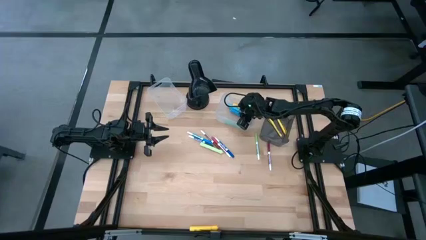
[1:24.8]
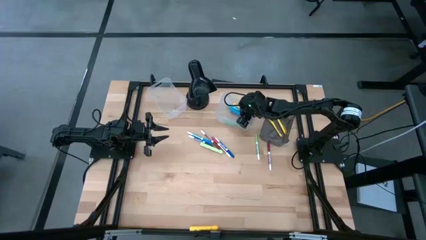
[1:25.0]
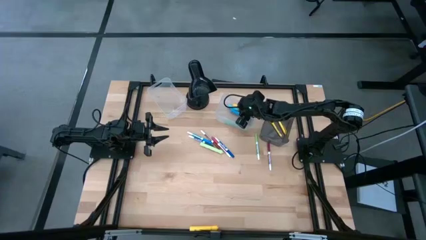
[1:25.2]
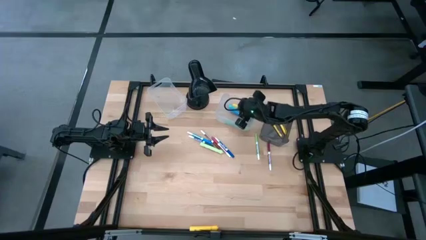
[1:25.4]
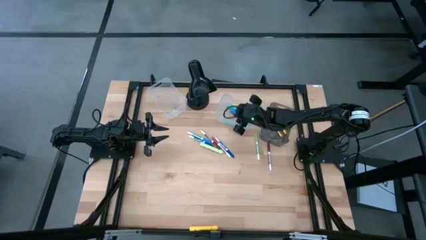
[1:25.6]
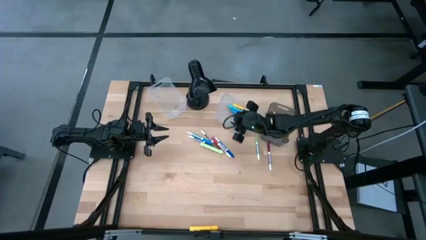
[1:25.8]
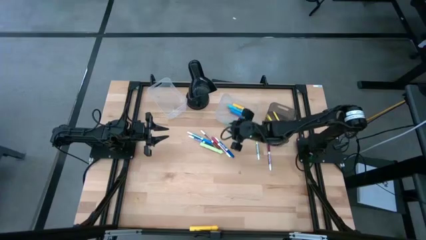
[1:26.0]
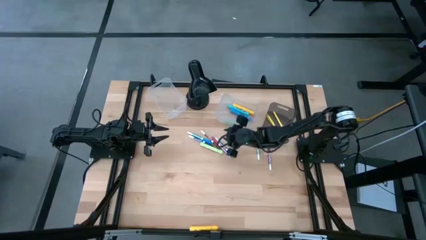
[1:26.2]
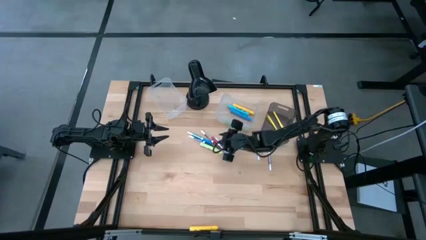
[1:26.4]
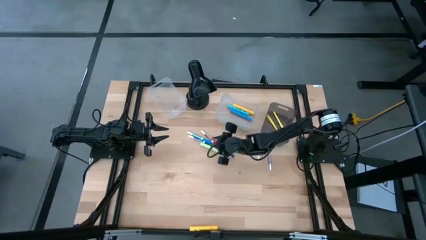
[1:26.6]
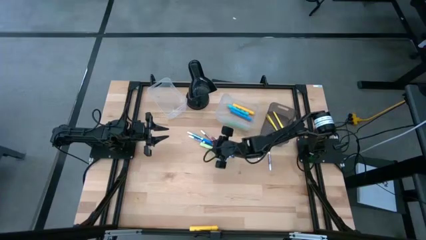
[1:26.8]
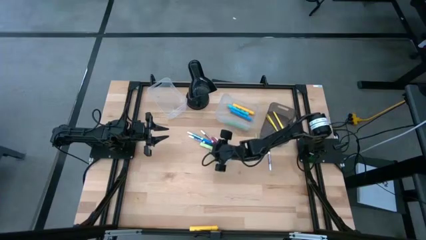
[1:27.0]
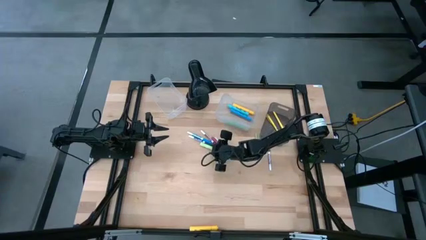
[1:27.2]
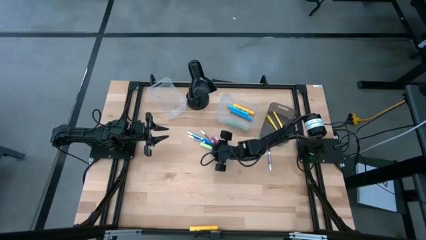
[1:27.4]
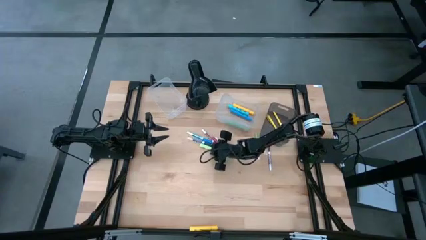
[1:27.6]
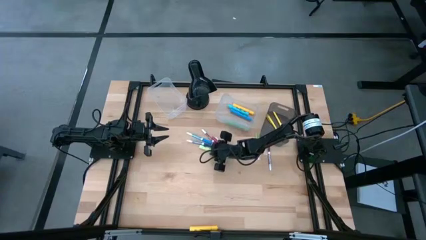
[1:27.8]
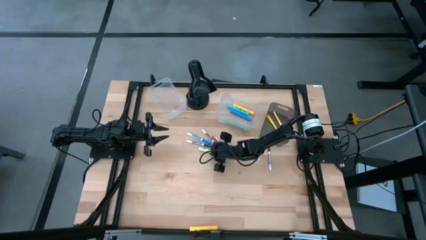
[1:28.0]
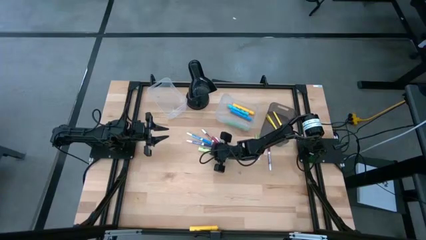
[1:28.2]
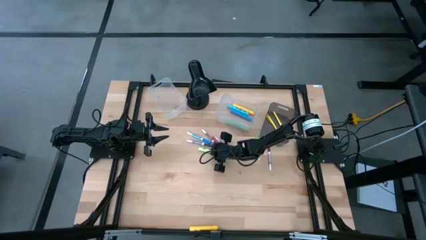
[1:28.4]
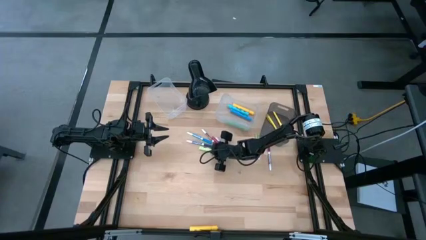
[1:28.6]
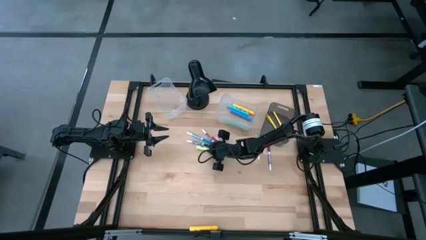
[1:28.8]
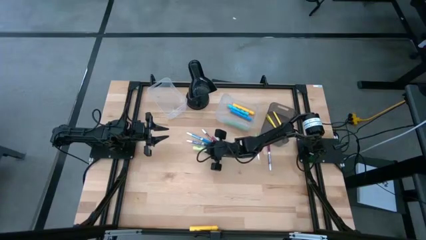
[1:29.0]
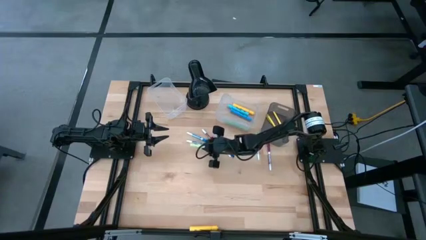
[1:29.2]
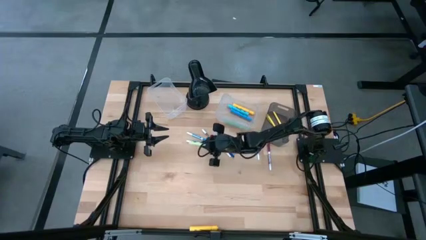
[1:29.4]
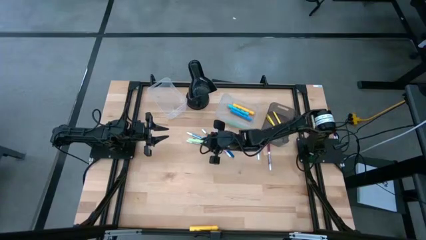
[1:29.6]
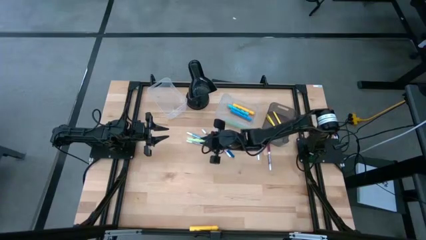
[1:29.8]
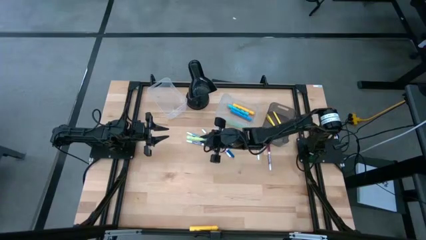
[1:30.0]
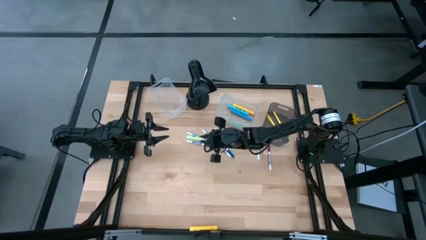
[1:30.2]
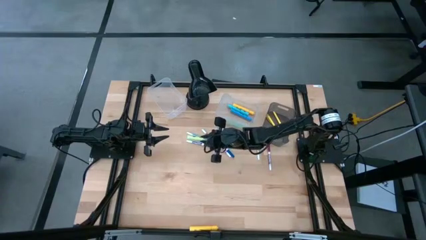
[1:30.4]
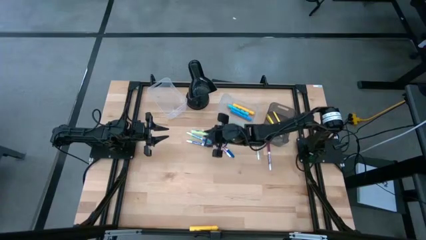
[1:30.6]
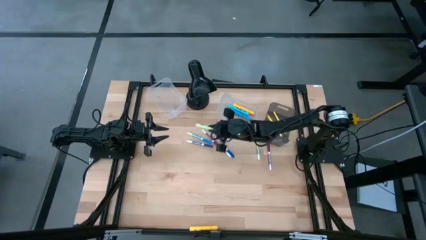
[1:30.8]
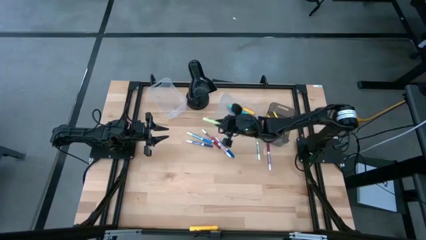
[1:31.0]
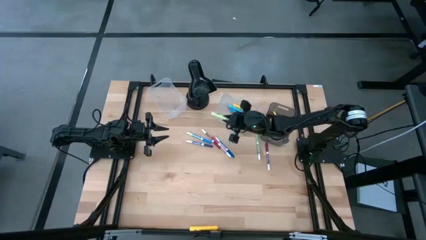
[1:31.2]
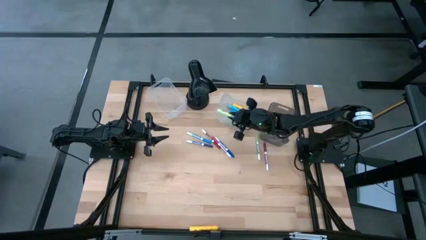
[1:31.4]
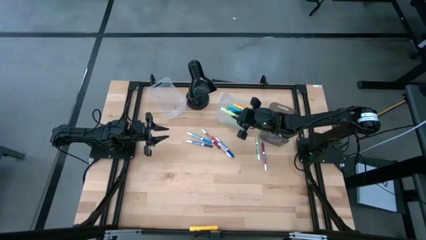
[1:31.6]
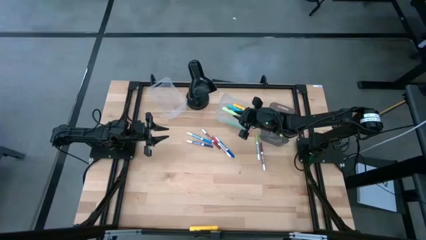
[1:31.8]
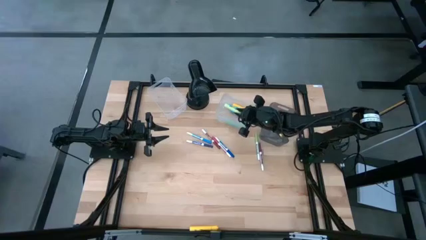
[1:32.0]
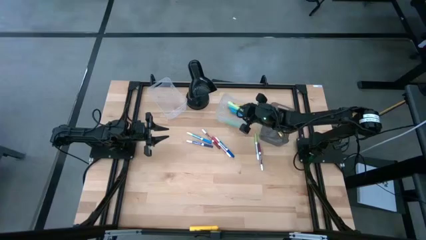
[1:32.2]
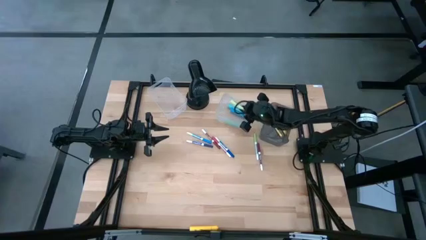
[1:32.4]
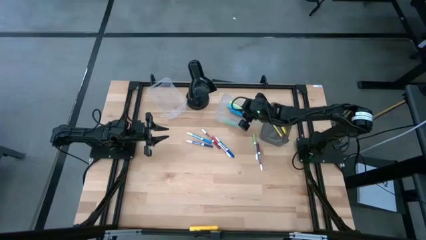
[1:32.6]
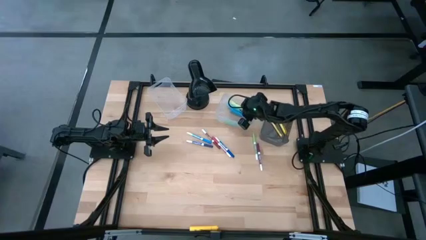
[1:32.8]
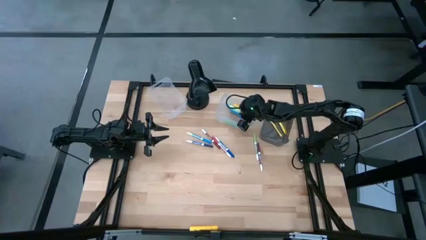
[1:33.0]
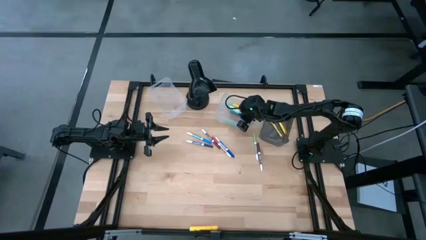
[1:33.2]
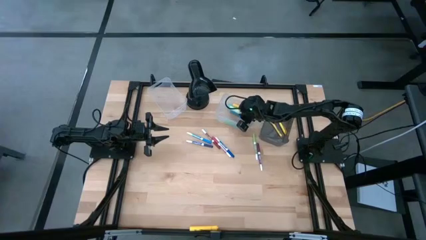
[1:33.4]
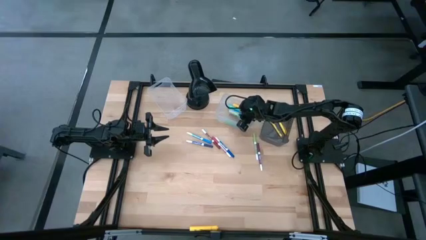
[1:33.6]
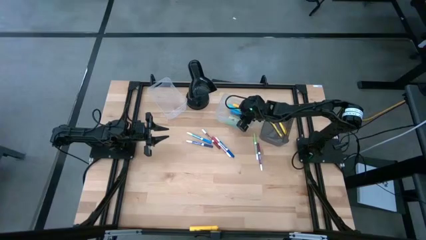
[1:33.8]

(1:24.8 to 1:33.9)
Task: Pick & Place Markers
Put the light green highlighter in the right transparent bin

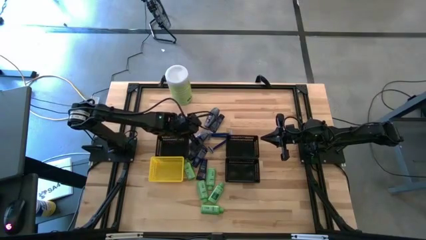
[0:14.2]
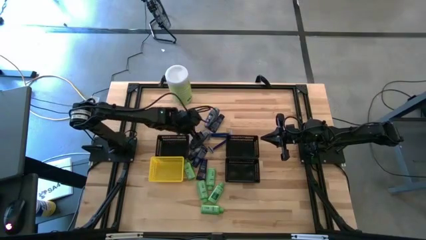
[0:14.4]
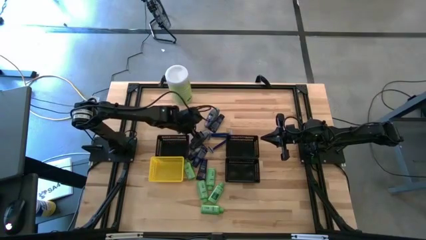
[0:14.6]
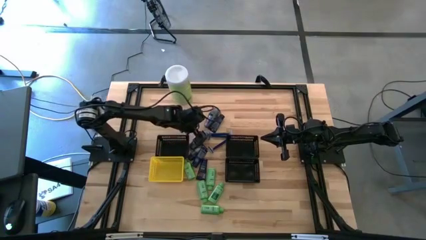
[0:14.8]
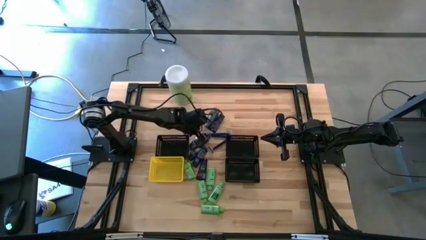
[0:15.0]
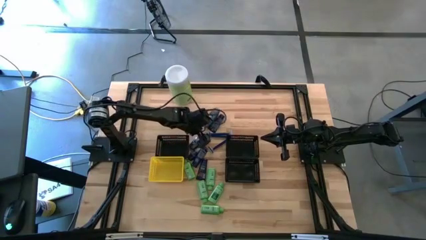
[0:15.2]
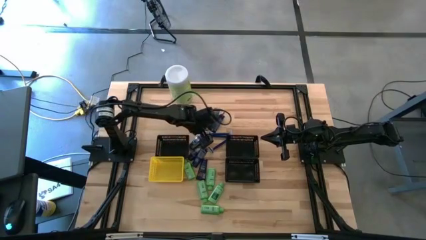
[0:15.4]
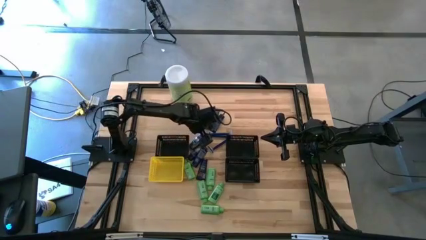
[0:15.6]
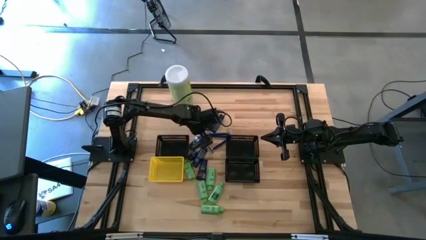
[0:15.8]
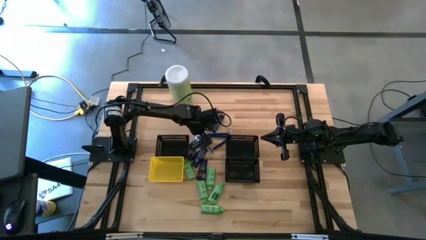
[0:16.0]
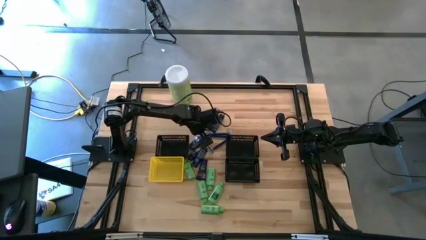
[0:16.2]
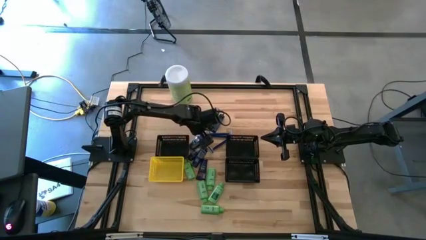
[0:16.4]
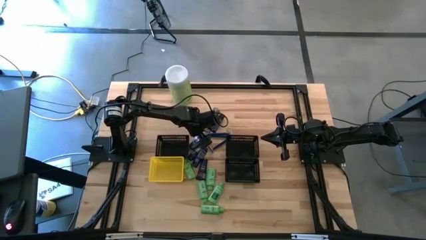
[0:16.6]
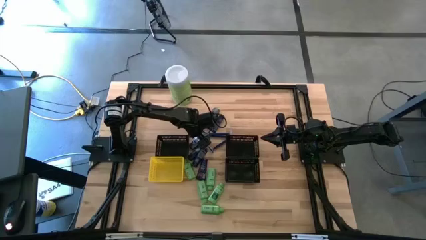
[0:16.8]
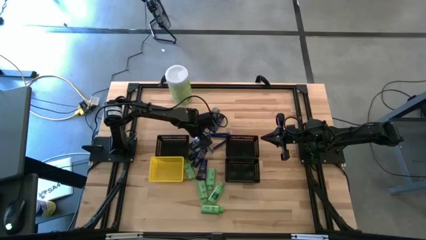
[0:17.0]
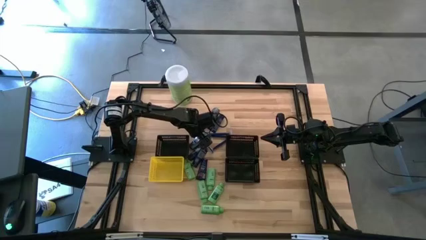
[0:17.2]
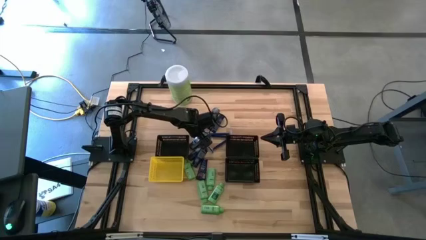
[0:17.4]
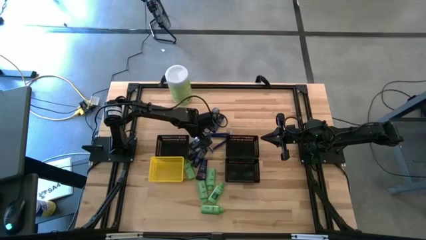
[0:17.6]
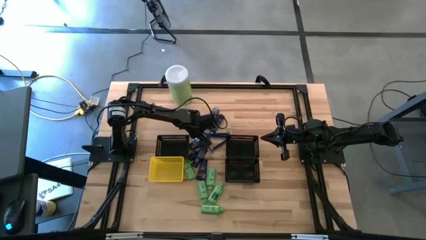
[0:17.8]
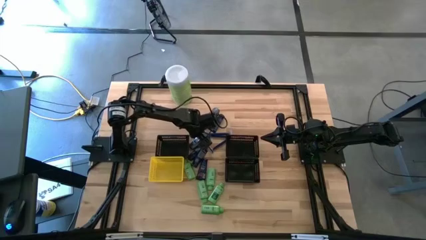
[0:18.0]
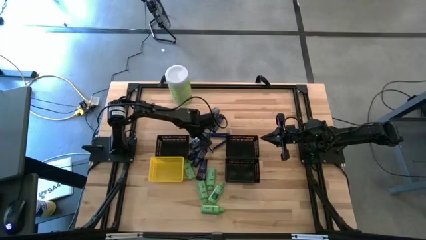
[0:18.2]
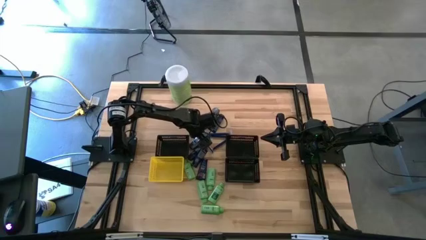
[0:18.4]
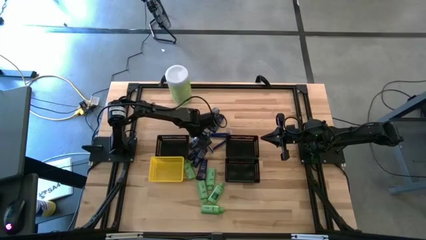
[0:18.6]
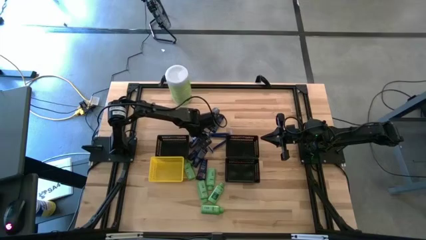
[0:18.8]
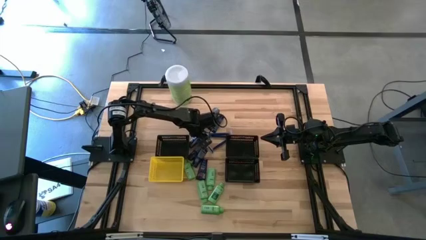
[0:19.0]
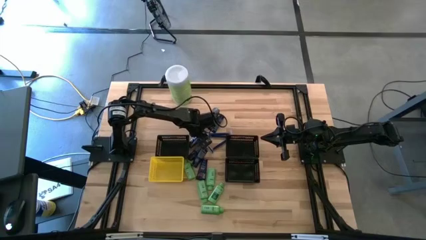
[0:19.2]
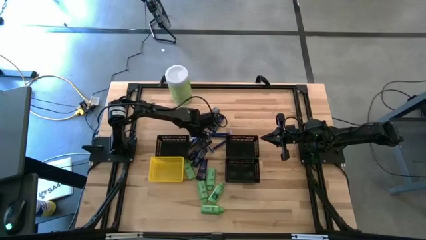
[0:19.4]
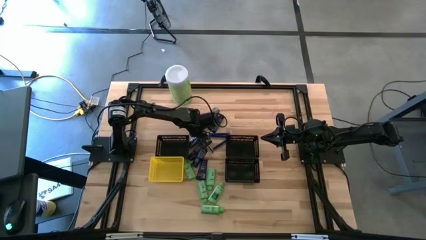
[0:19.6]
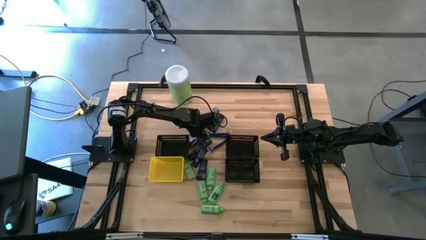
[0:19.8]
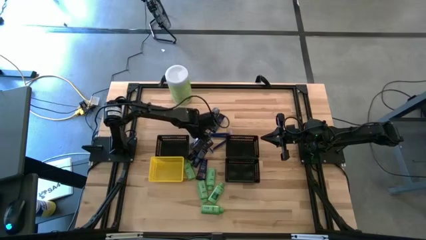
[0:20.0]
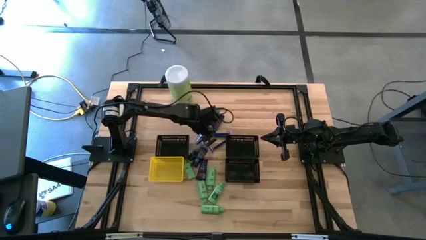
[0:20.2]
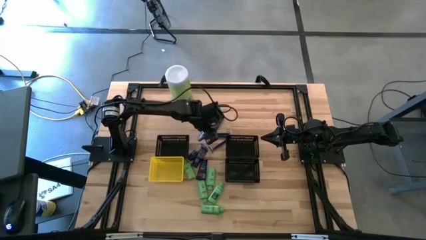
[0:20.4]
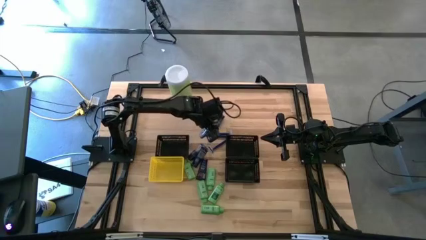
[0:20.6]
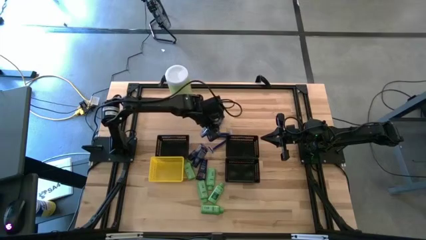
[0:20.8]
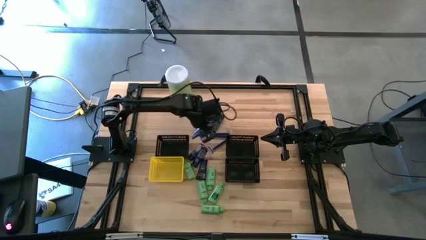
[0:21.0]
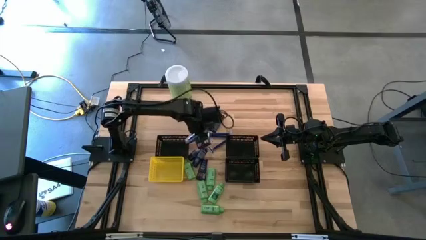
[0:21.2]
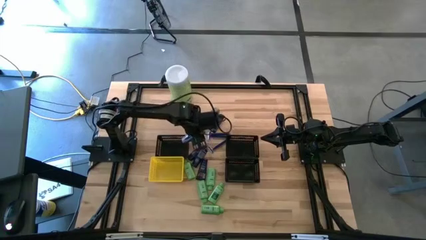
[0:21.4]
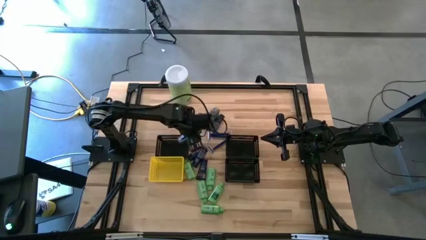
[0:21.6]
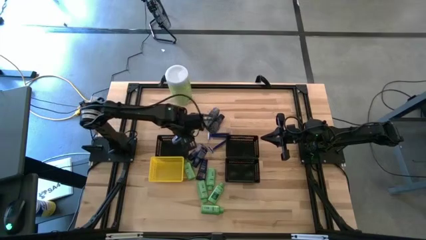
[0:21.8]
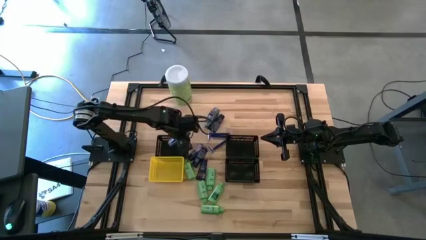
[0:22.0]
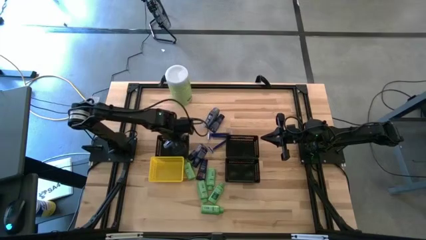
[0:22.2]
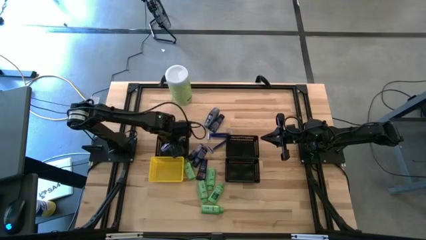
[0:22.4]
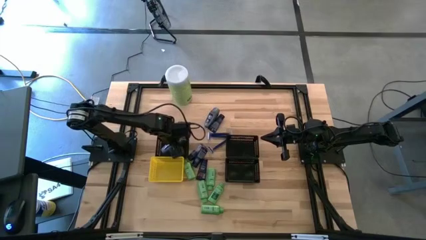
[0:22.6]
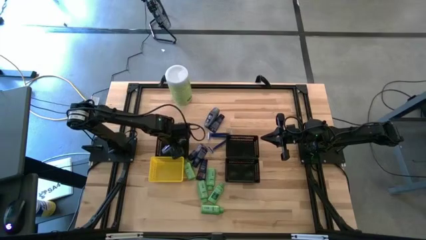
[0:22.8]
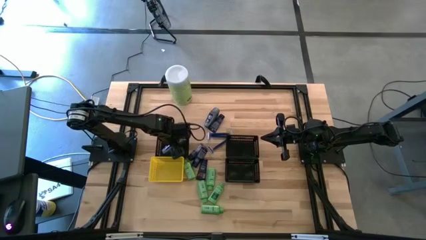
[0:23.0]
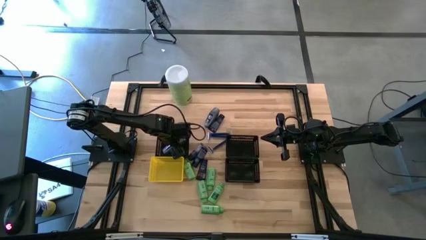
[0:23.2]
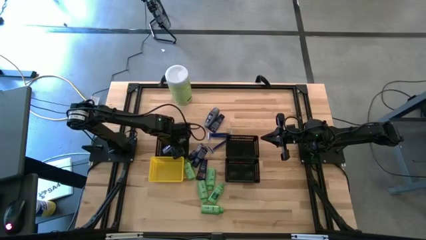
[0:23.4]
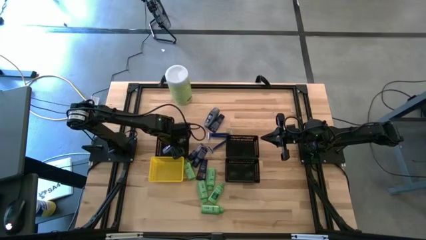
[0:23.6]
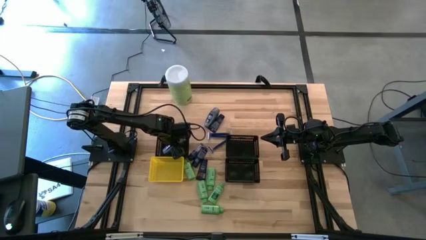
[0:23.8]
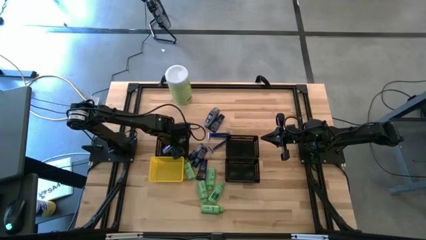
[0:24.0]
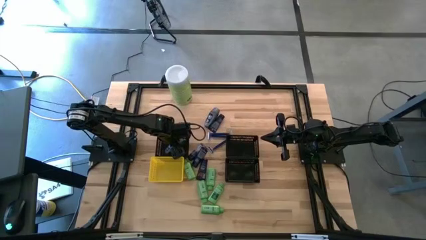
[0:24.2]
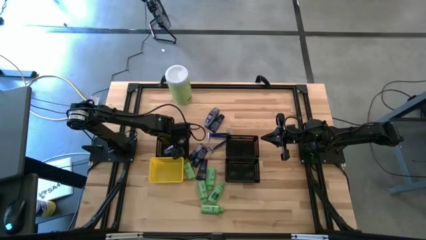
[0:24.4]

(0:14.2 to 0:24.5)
Task: Pick & Place Travel size toiletries
Put the bottom gray deodorant bottle into the top left black bin
